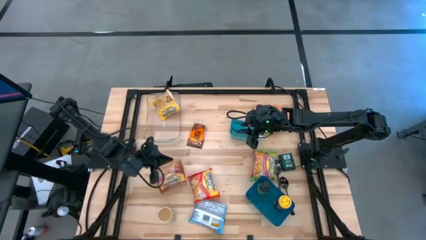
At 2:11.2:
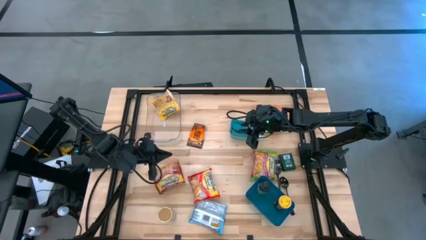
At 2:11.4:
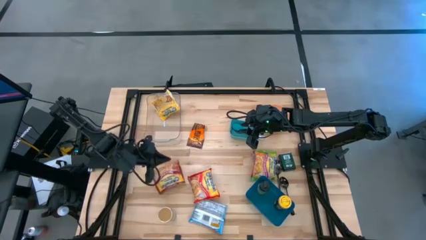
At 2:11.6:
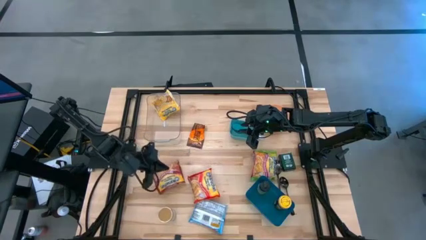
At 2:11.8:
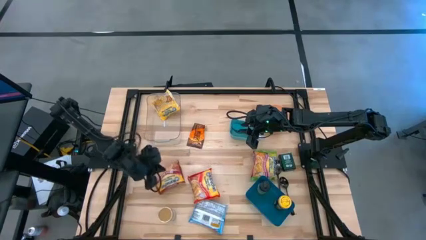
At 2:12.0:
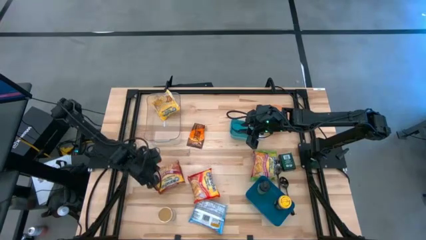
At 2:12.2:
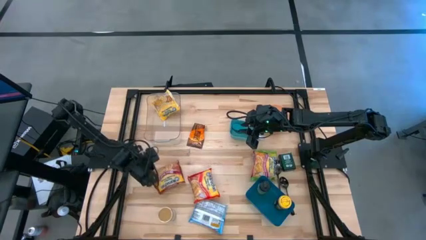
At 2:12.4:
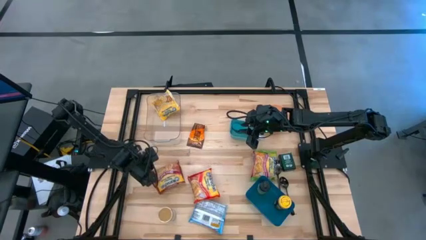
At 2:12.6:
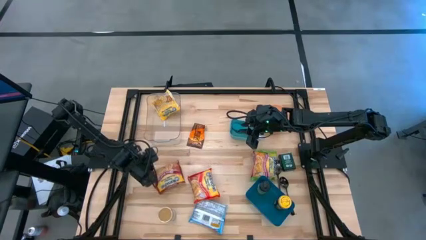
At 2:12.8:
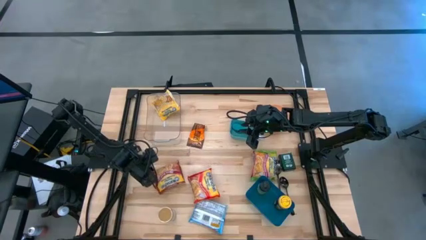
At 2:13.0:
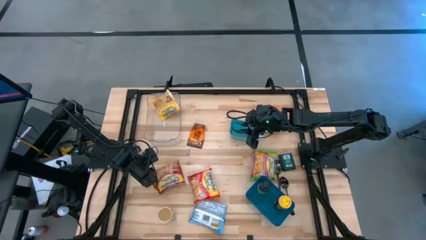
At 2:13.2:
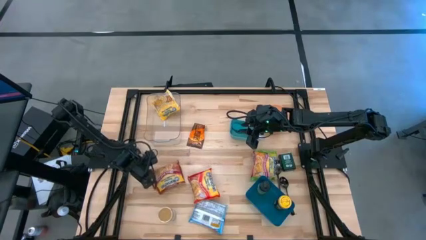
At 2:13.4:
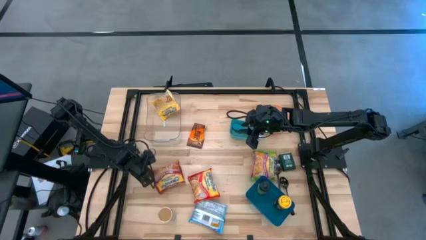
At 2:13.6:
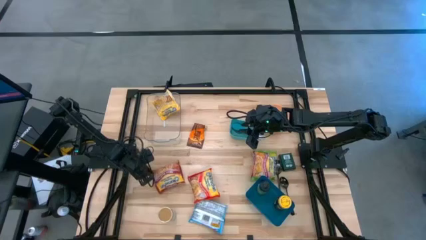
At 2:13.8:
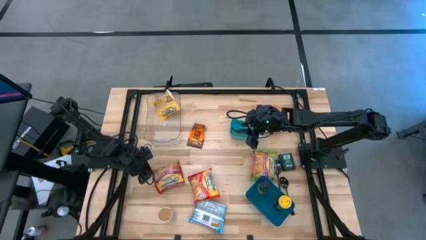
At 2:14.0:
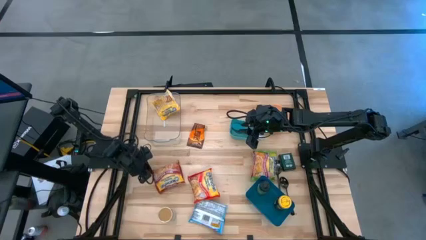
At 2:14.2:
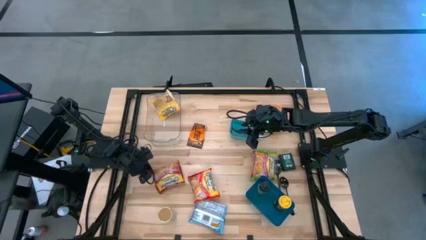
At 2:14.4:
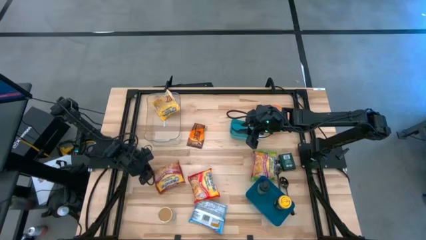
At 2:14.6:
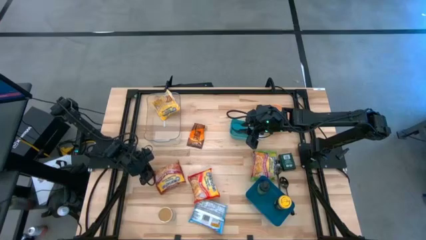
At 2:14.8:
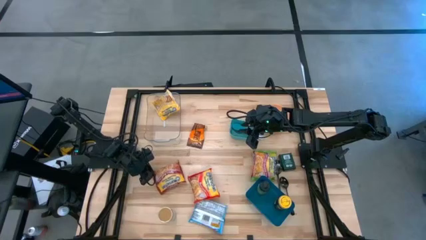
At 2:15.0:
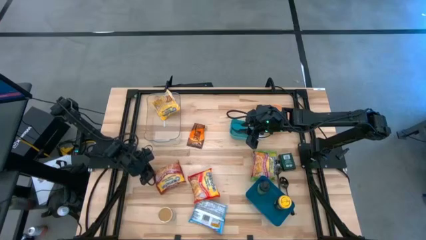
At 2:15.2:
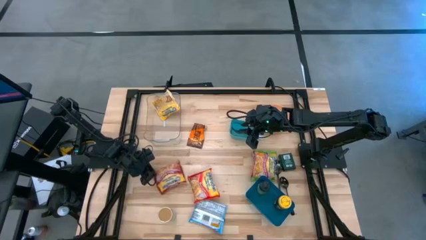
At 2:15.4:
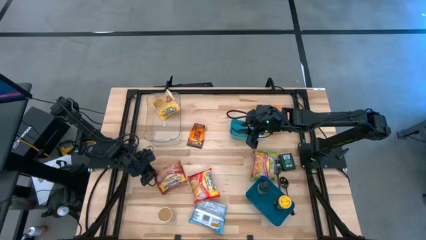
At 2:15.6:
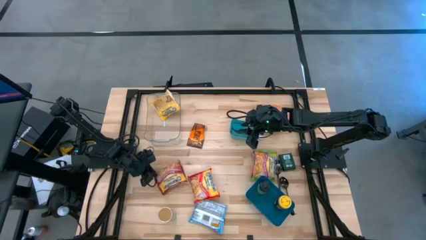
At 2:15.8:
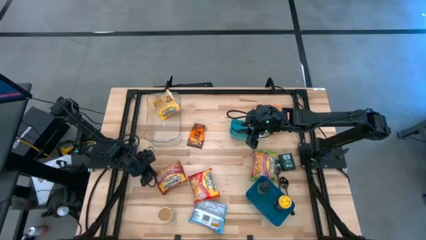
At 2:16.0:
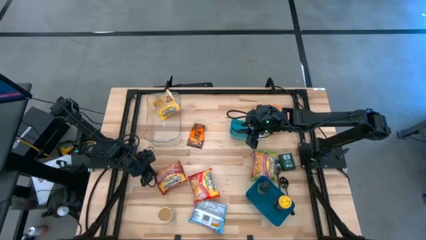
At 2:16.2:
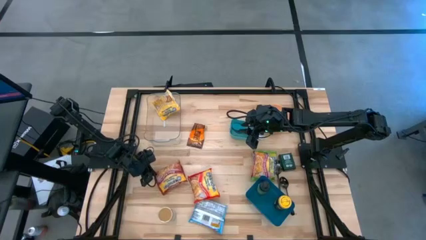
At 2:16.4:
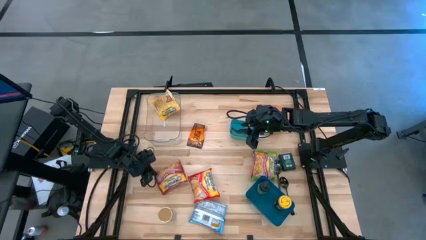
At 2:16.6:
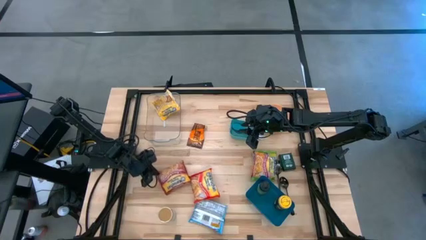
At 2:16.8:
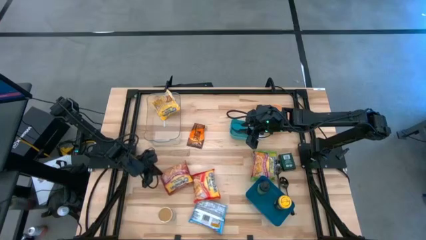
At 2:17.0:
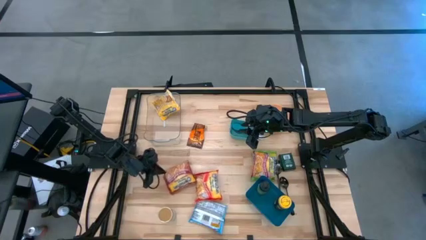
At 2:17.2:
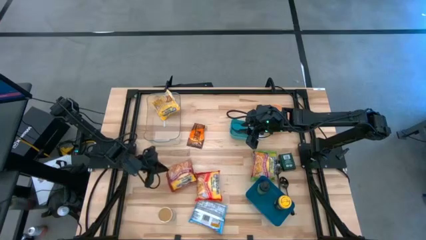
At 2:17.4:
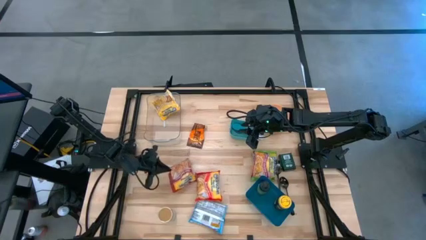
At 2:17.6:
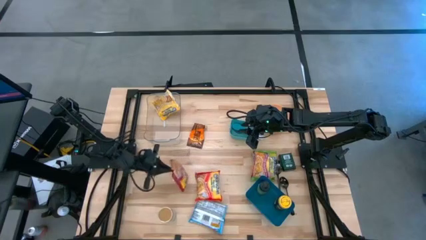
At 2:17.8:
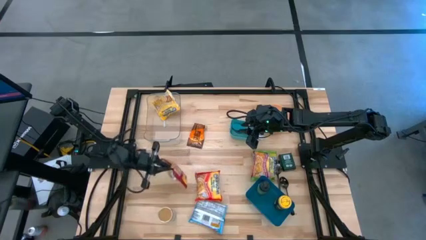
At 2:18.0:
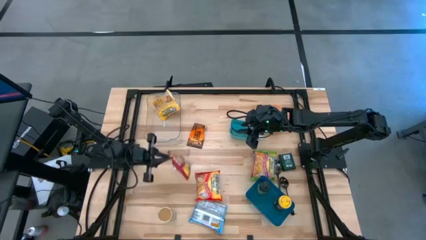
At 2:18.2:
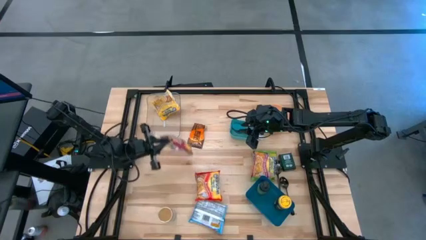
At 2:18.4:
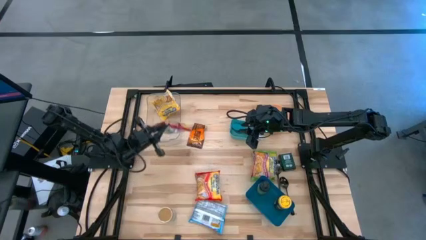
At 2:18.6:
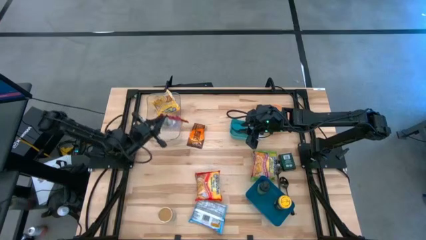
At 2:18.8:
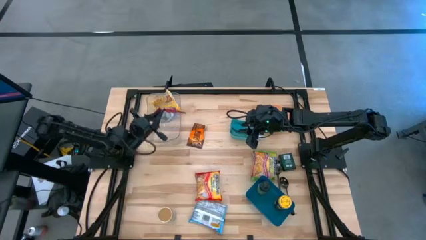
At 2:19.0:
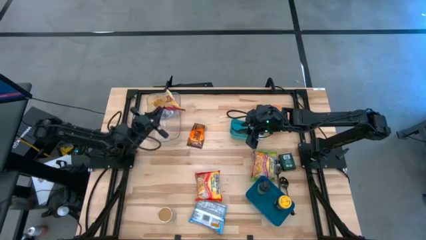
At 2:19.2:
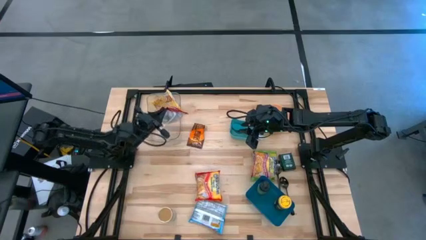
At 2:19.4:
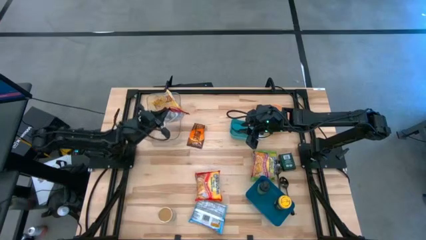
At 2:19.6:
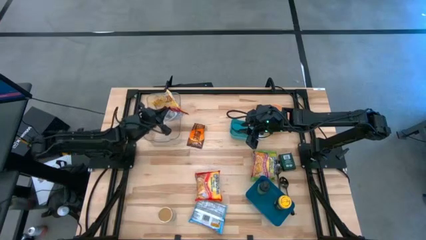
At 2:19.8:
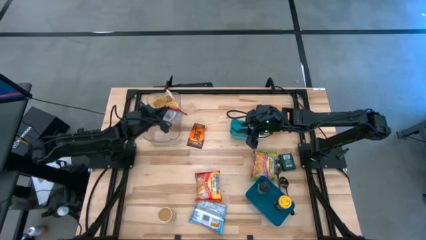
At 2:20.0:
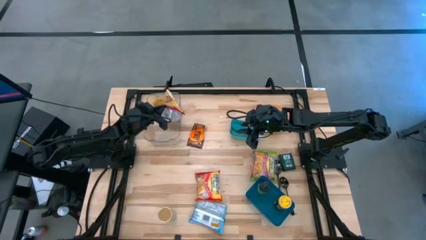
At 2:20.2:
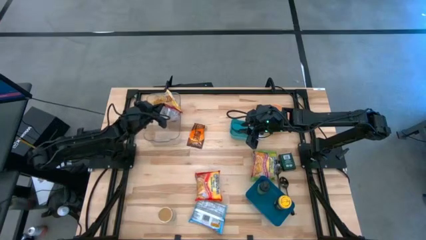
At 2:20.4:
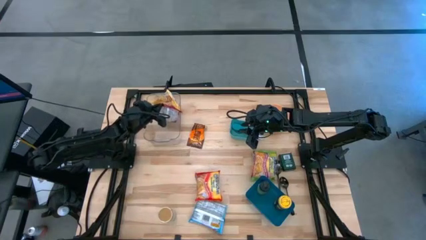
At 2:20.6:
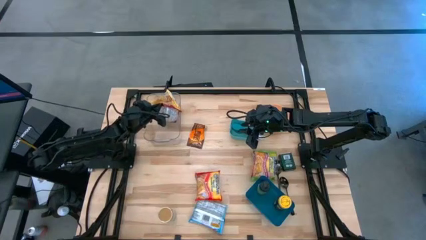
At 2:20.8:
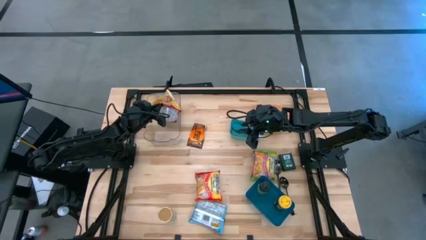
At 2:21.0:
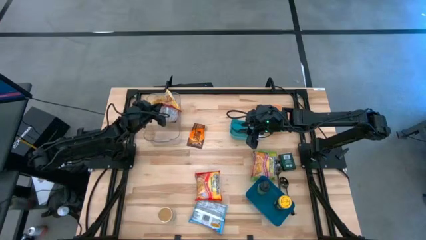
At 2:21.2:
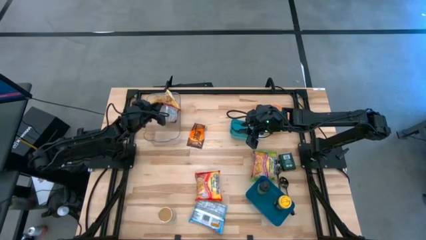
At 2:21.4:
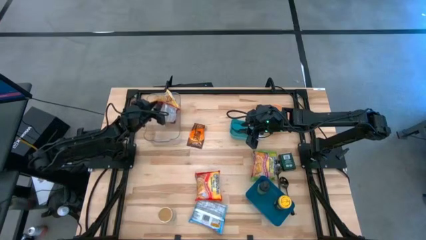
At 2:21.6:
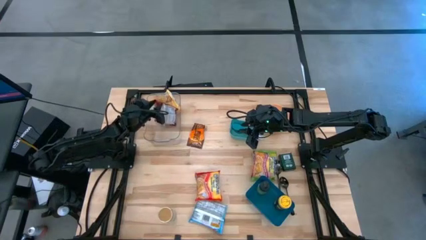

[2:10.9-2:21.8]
Task: Pick & Place Food Item
Put the red noodle pack into the transparent bin

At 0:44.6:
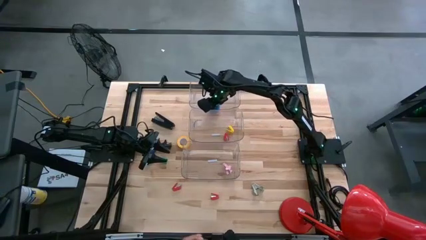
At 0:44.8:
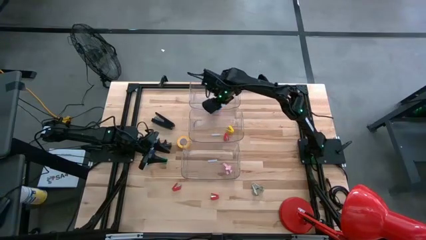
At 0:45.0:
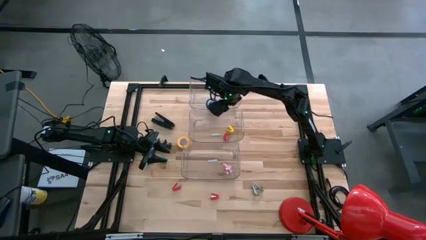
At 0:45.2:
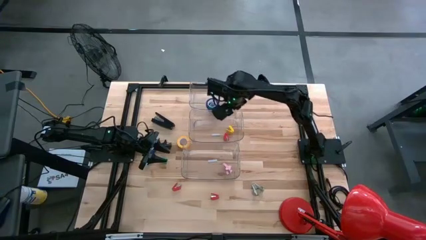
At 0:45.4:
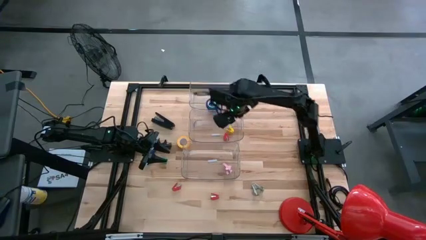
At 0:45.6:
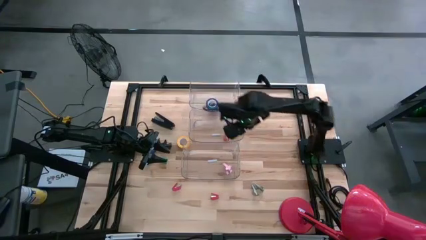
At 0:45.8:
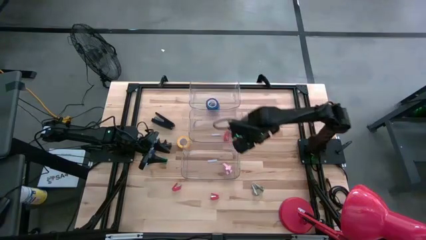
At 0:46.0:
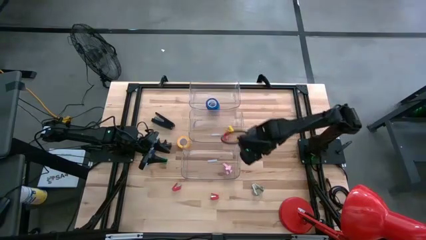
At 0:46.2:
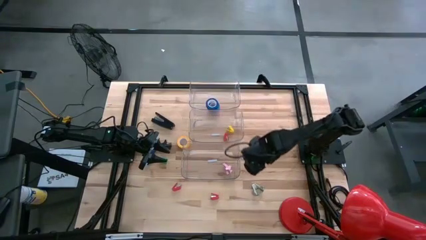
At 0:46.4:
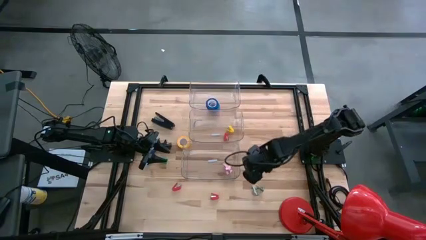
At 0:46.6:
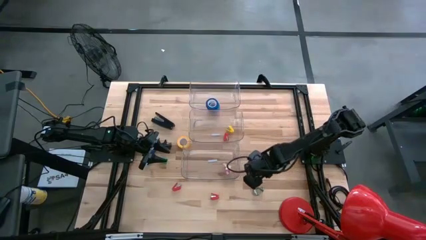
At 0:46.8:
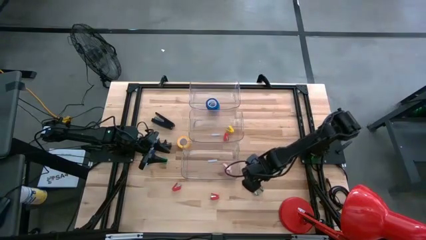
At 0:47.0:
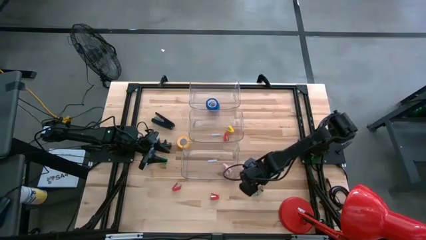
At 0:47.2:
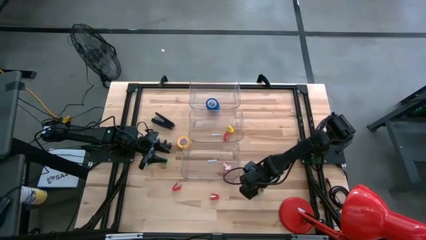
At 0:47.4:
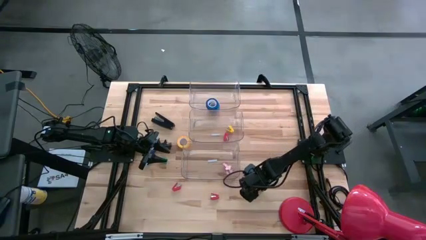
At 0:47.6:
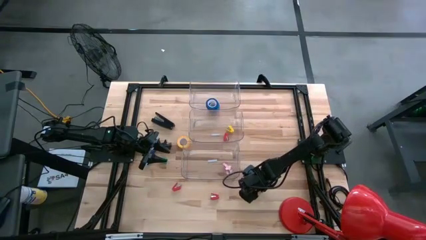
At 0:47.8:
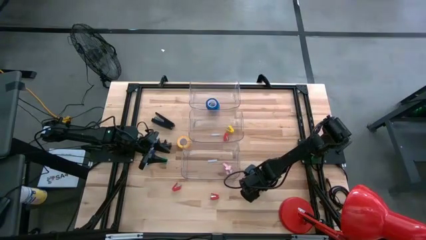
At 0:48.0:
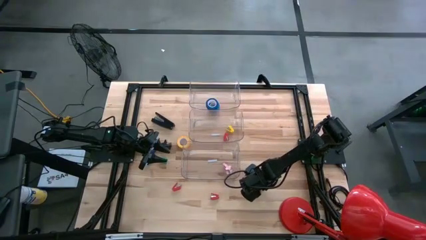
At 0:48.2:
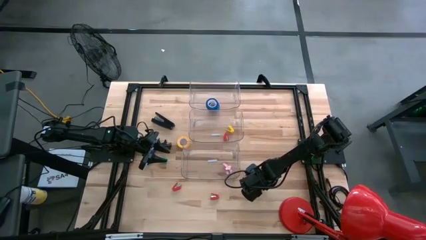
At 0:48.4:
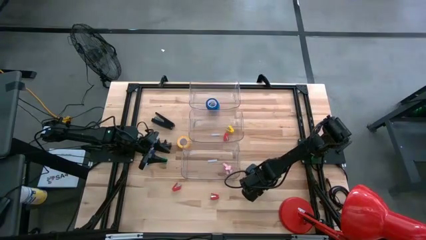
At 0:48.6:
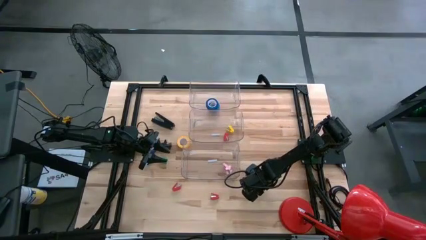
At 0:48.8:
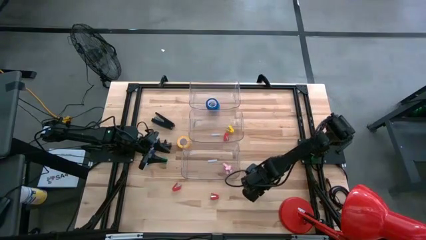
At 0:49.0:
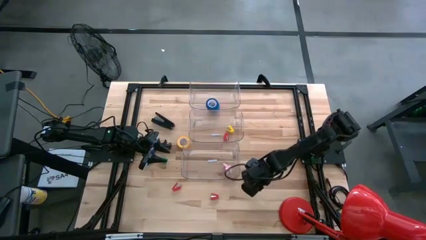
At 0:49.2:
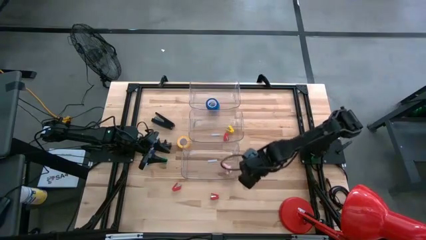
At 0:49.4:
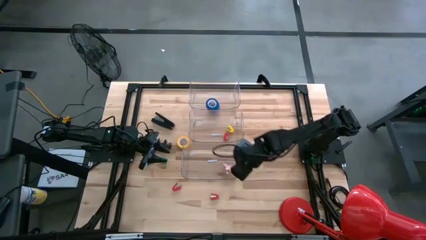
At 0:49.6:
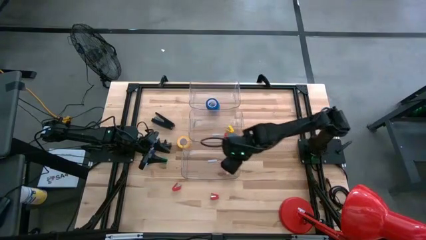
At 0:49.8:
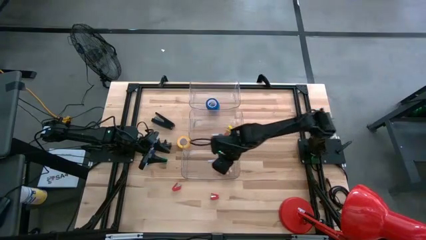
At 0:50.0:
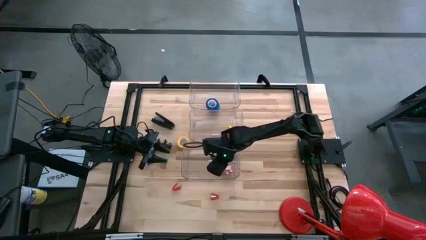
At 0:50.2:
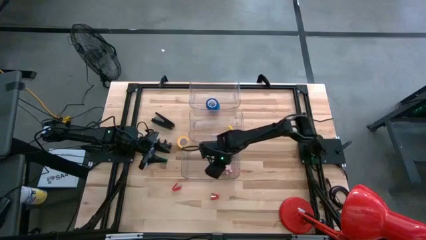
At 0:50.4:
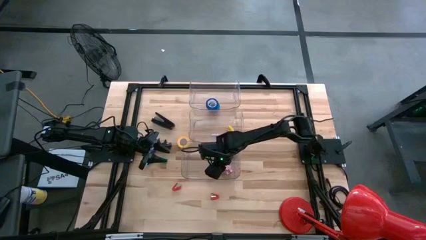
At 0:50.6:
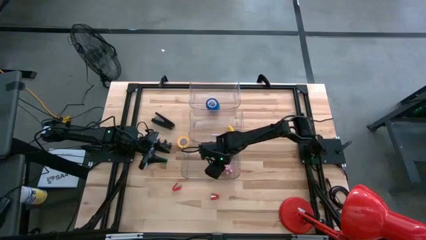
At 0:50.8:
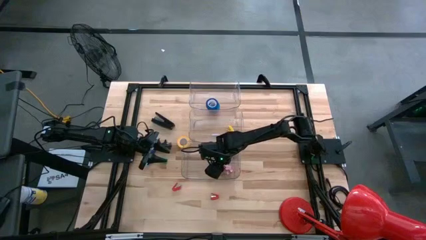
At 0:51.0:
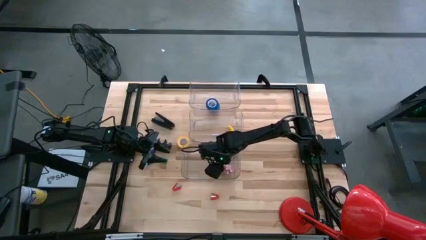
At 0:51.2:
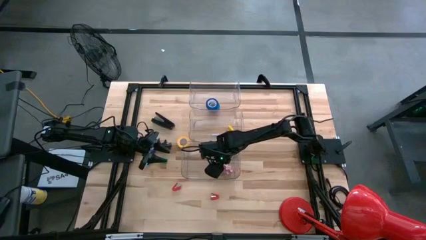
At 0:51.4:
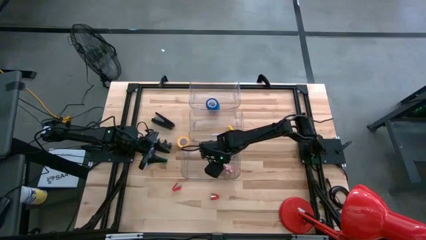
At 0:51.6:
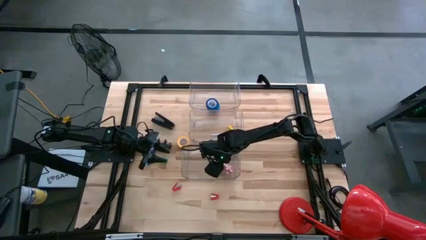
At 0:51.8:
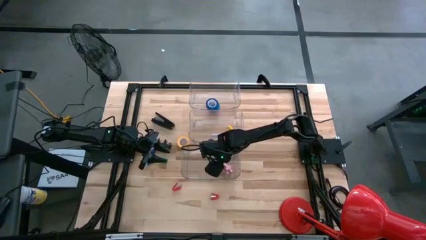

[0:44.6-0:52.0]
Task: Pick and place Stapler, Stapler remover, tape
Put the gray staple remover into the bottom transparent bin
